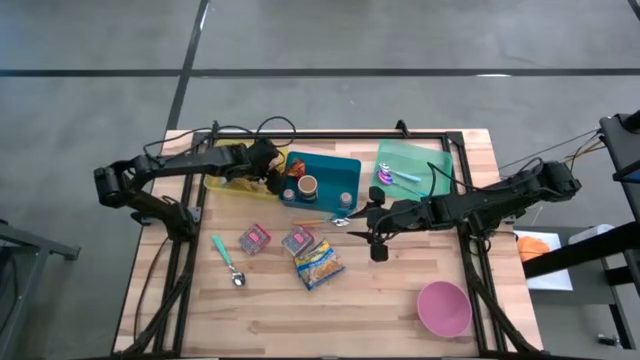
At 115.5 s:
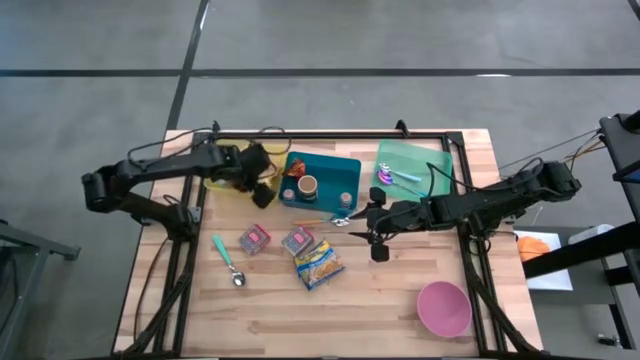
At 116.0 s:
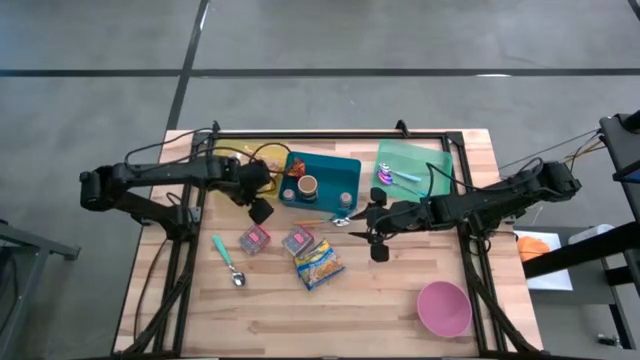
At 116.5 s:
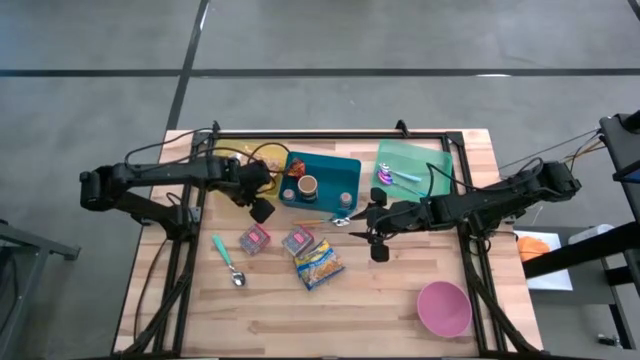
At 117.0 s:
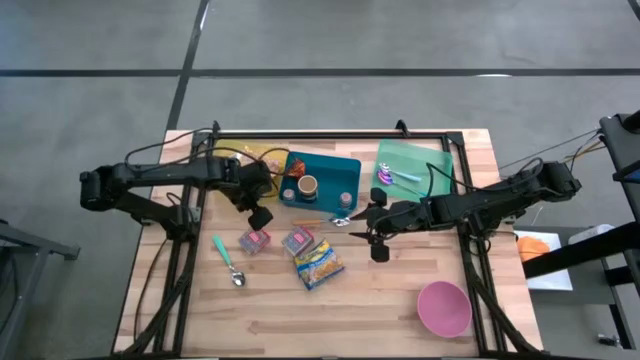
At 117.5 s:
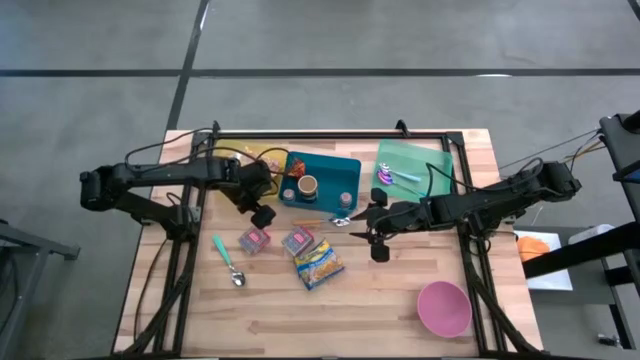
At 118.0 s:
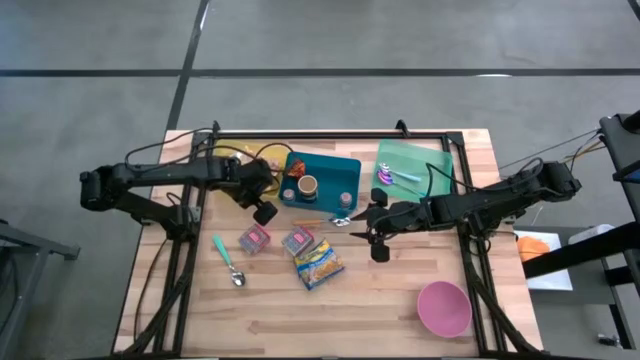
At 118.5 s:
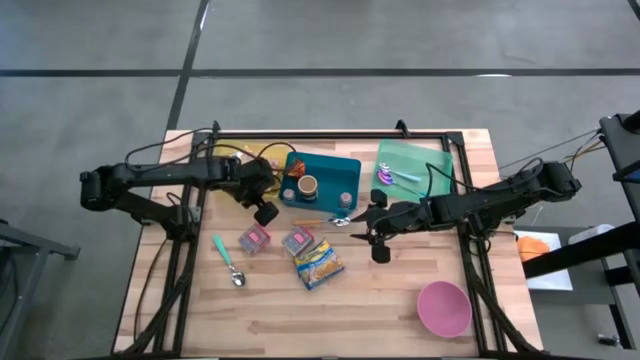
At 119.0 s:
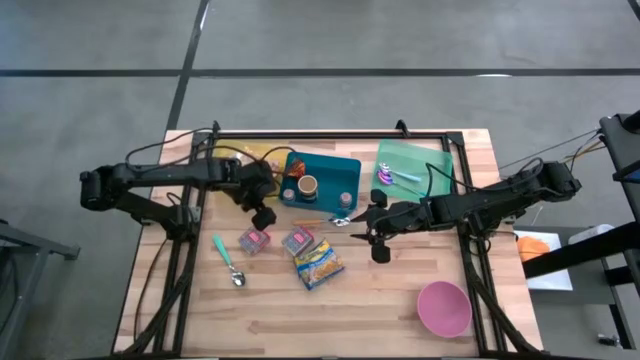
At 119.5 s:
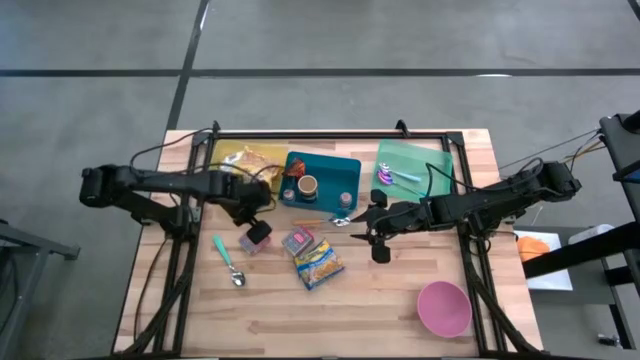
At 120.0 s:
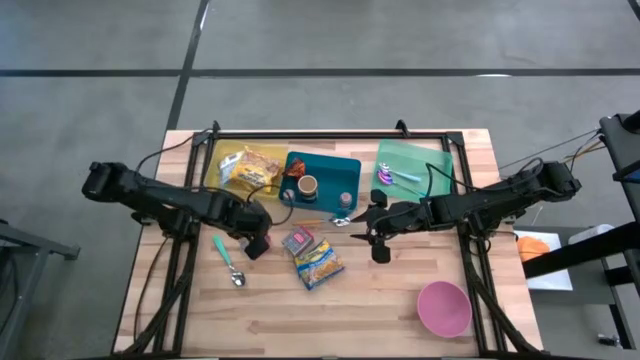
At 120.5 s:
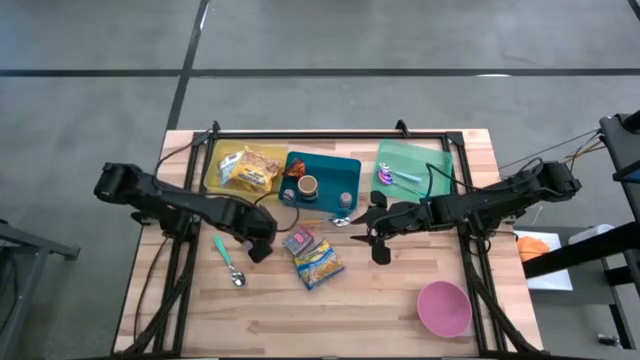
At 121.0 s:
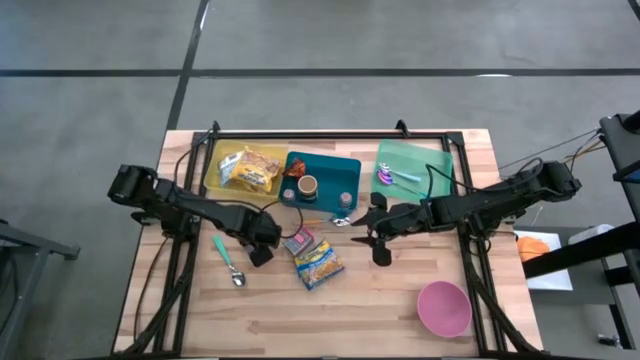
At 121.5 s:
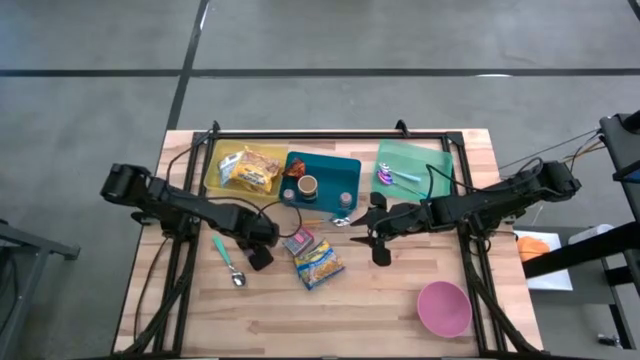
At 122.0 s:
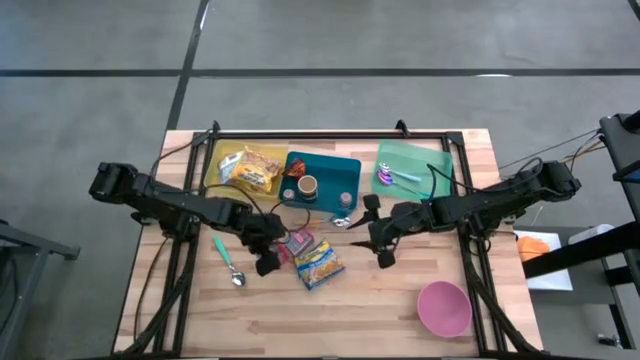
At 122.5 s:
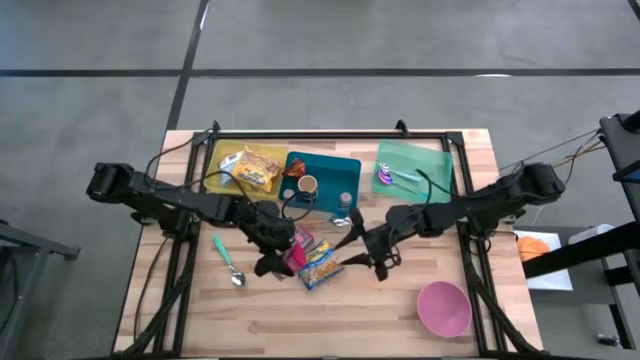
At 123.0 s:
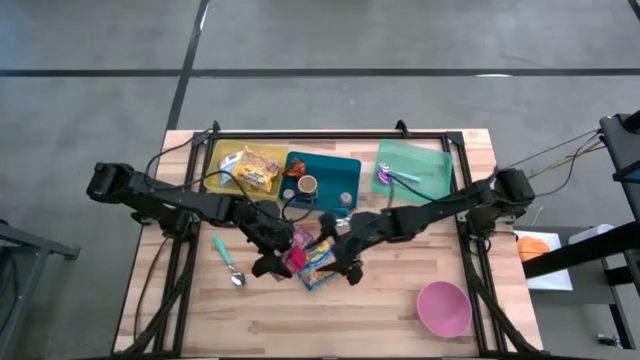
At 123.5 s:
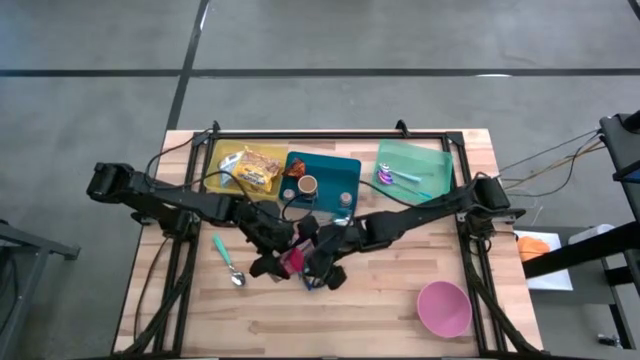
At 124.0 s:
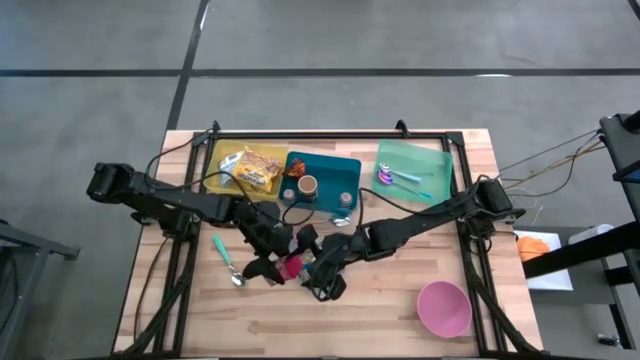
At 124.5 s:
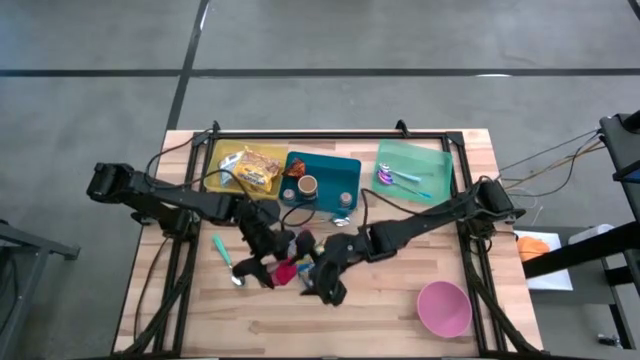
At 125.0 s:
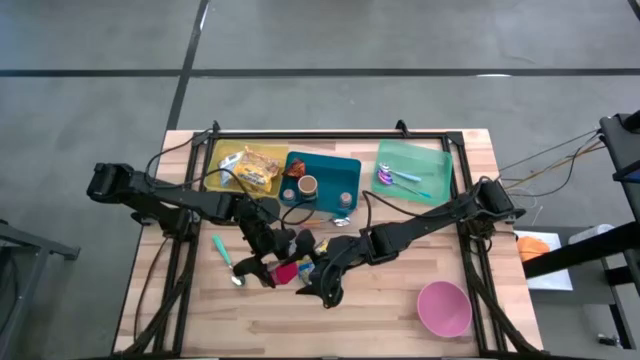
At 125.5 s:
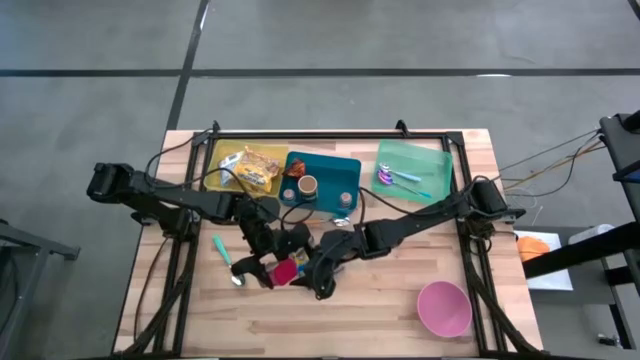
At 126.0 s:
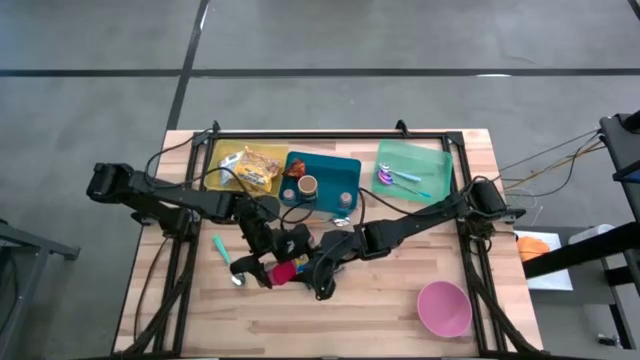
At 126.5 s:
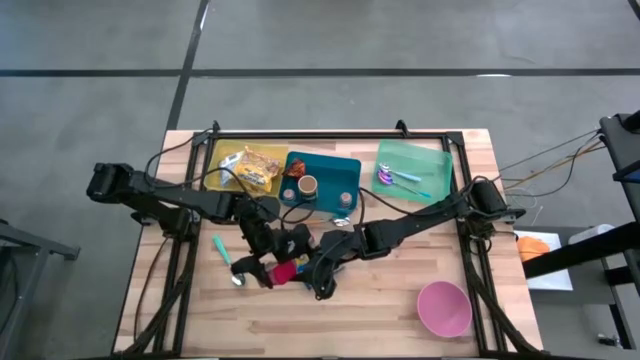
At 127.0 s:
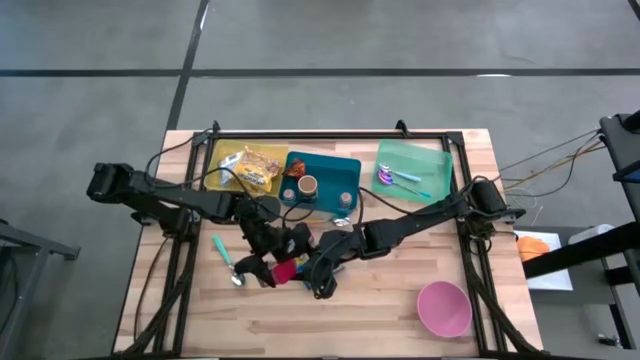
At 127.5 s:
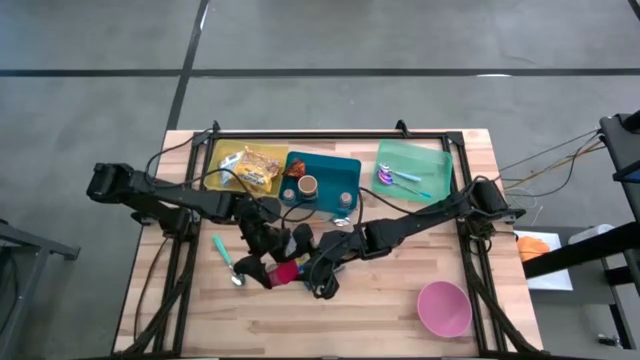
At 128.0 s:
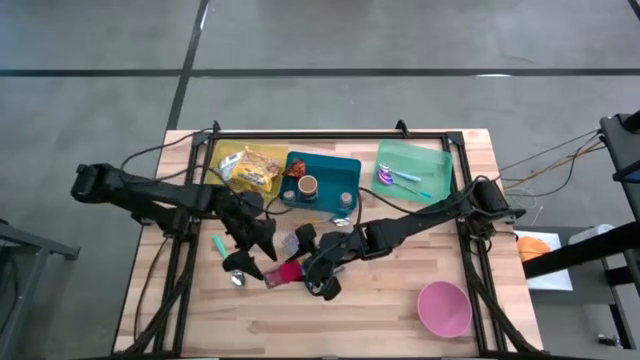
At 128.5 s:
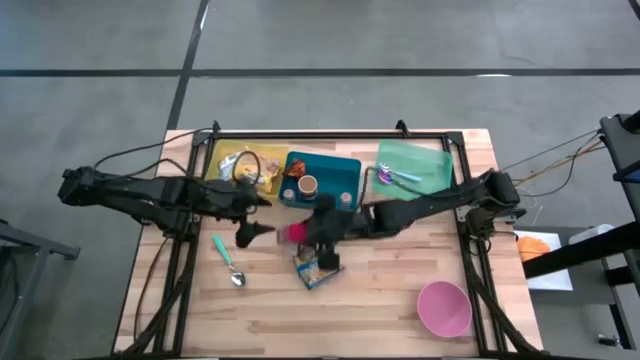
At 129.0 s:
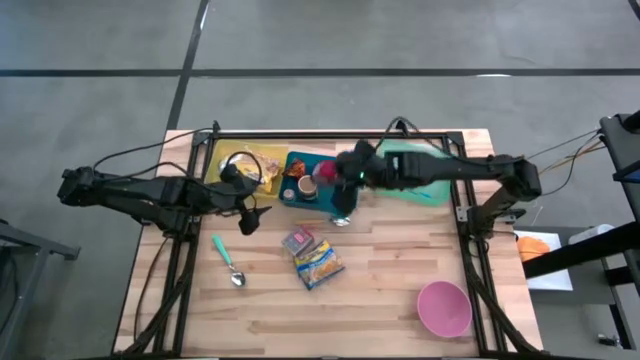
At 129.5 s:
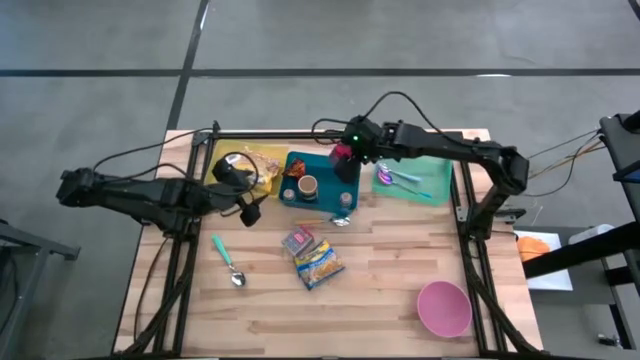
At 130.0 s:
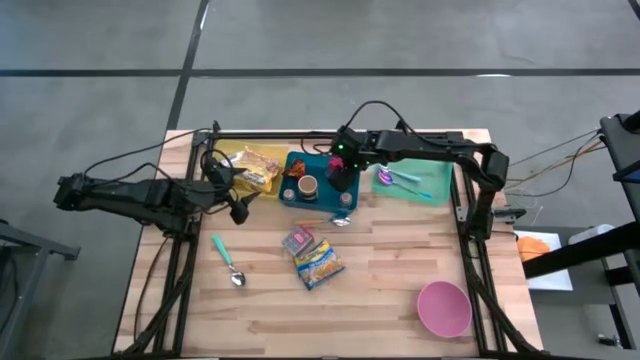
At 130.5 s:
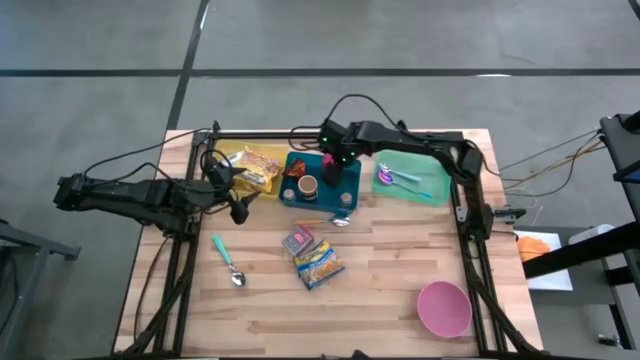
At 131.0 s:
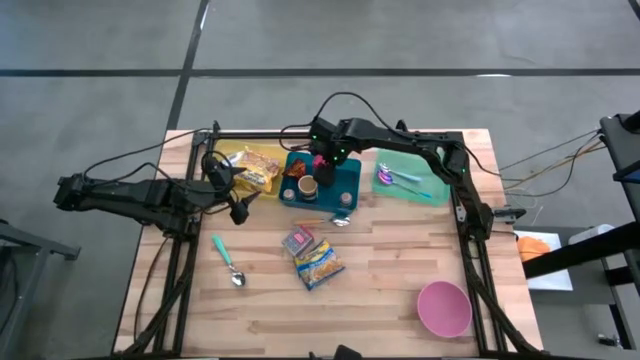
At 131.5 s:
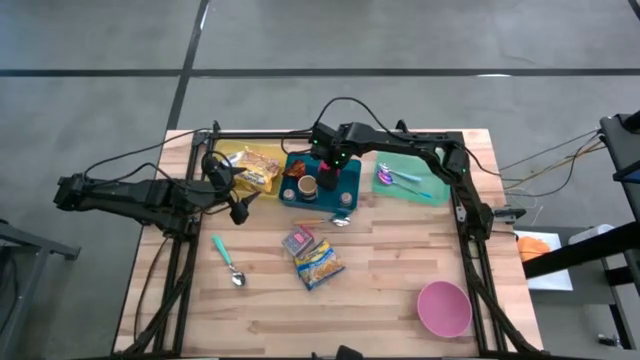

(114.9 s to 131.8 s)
Put the left red seasoning into the blue bin

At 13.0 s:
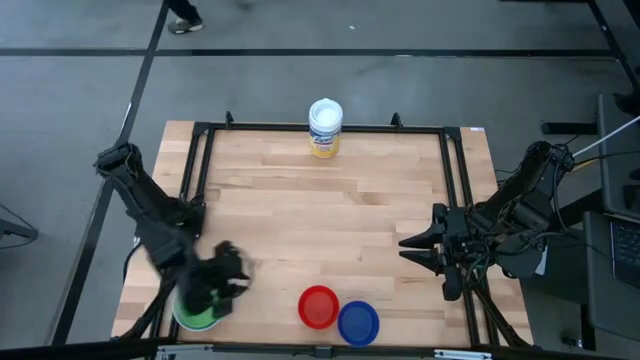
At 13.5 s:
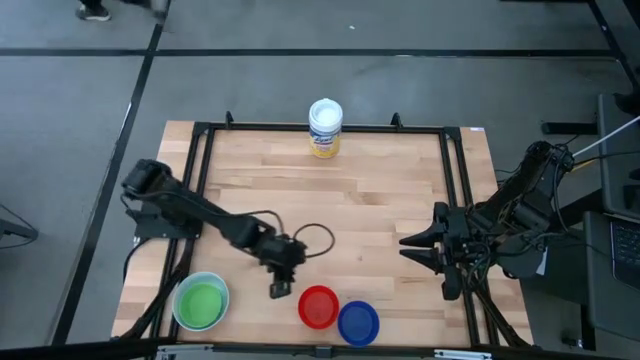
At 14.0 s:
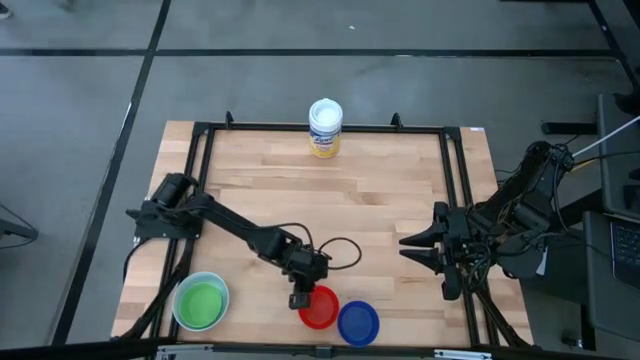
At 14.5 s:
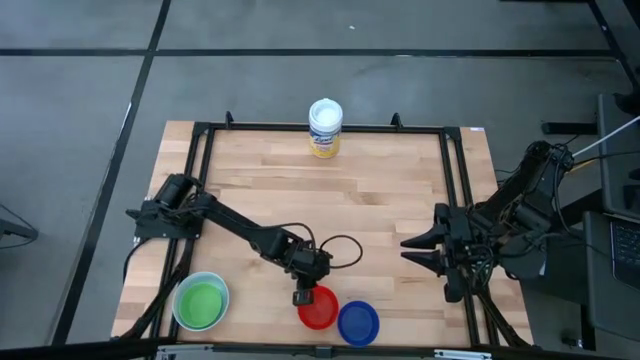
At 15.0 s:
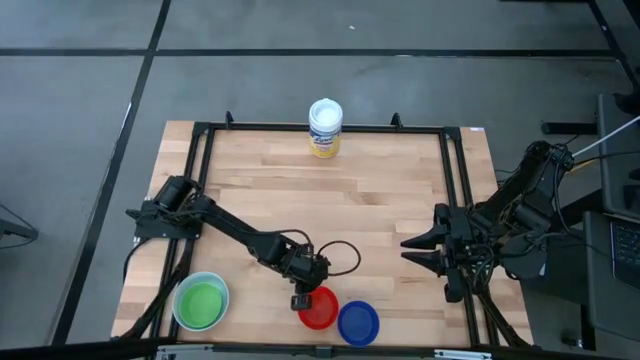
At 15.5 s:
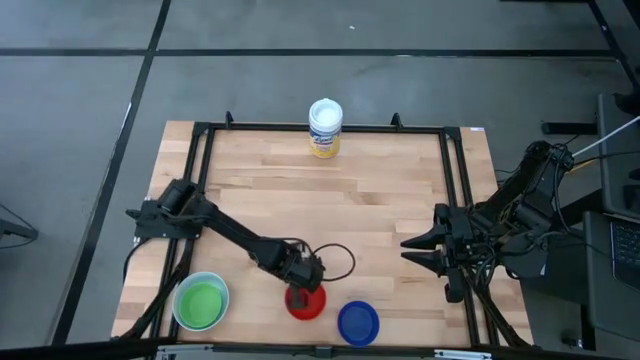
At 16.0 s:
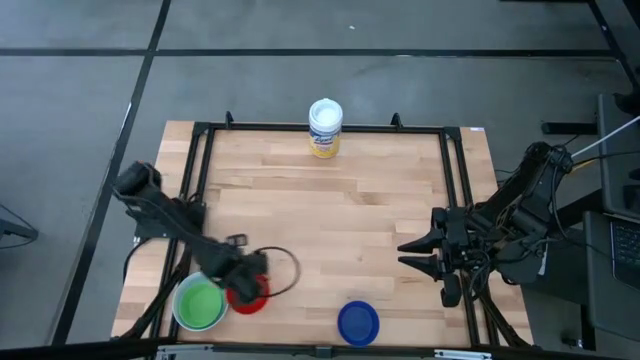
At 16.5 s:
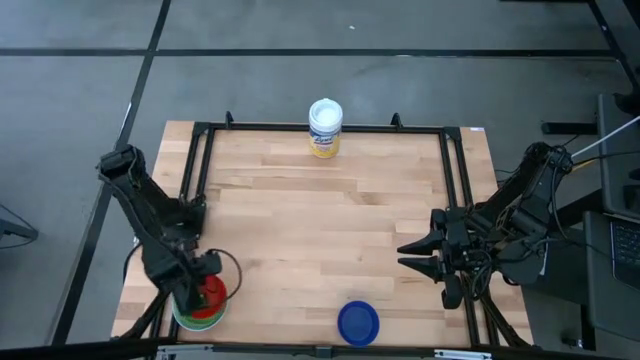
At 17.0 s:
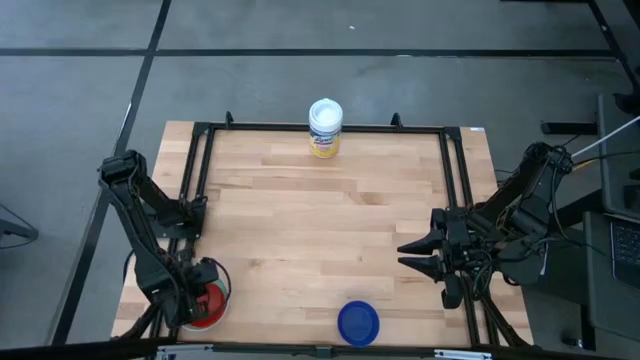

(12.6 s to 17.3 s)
Stack the red bowl on top of the green bowl
